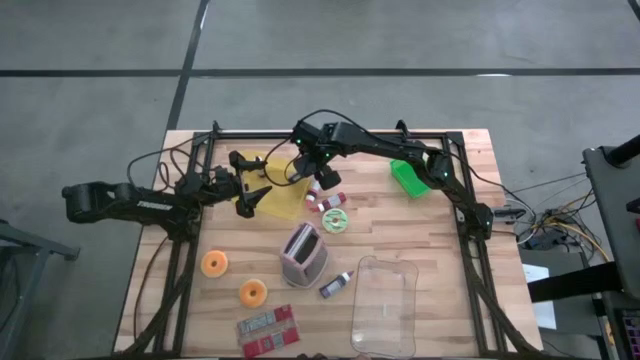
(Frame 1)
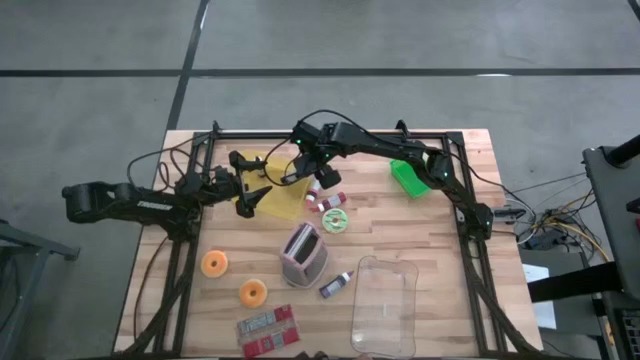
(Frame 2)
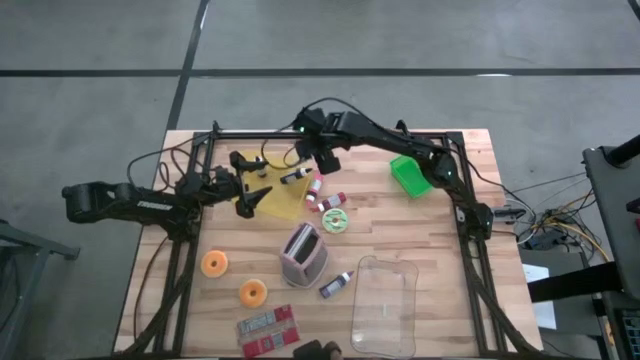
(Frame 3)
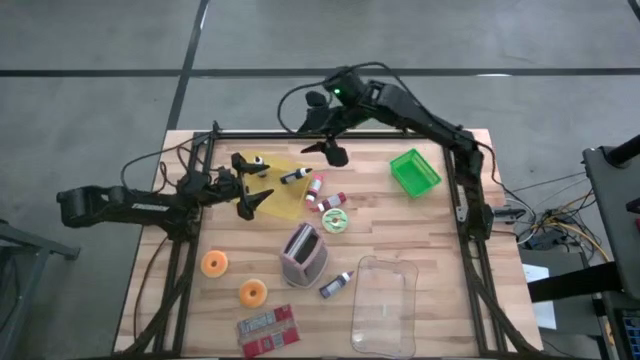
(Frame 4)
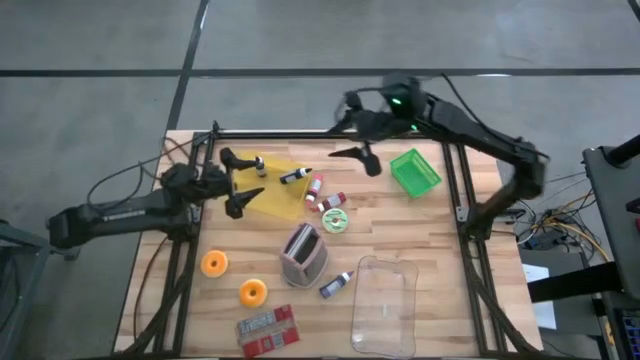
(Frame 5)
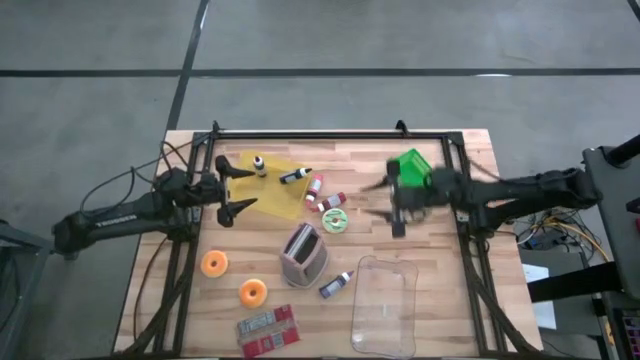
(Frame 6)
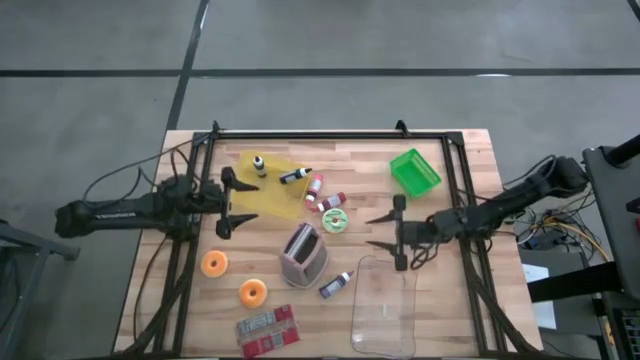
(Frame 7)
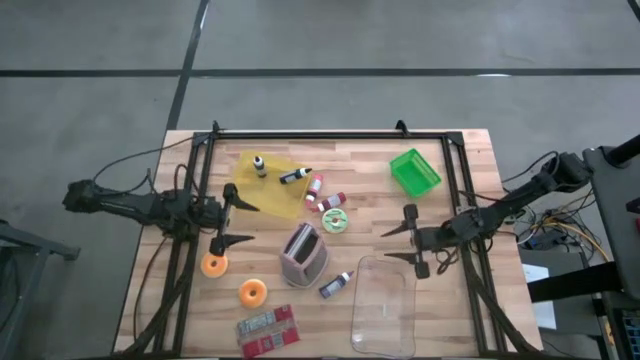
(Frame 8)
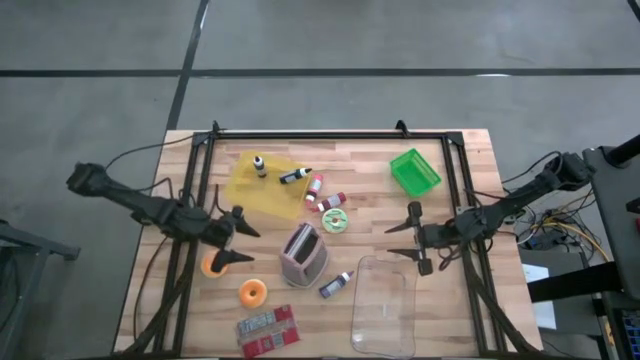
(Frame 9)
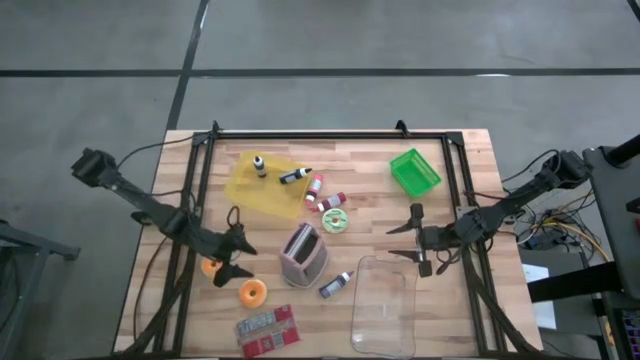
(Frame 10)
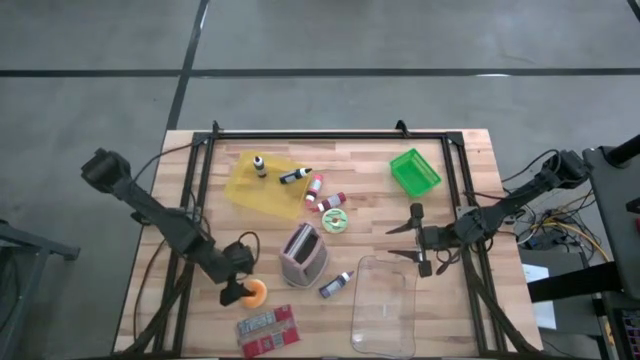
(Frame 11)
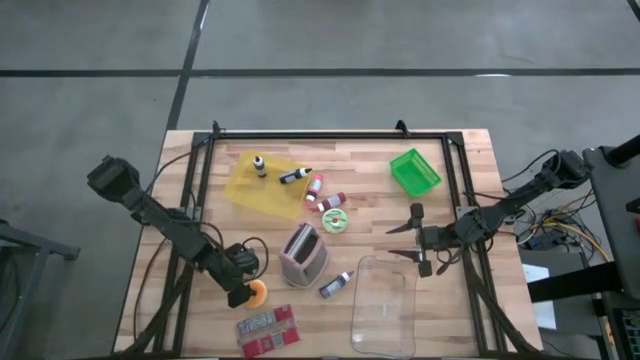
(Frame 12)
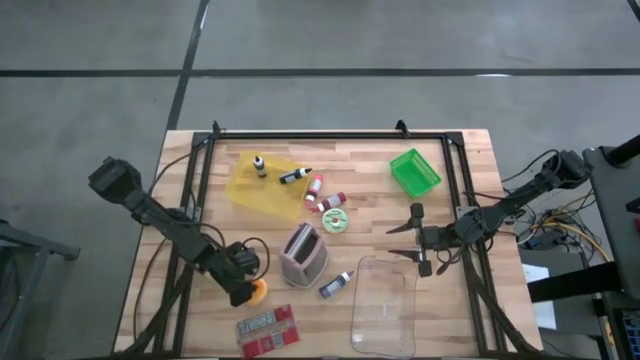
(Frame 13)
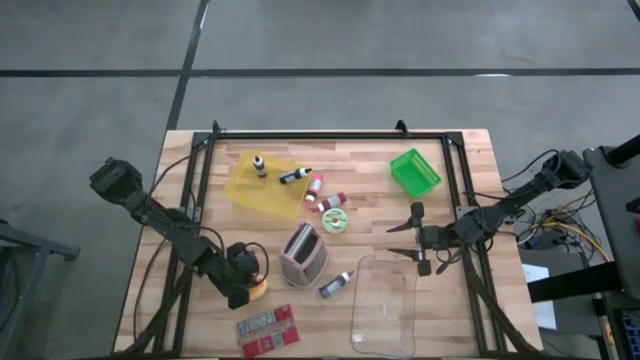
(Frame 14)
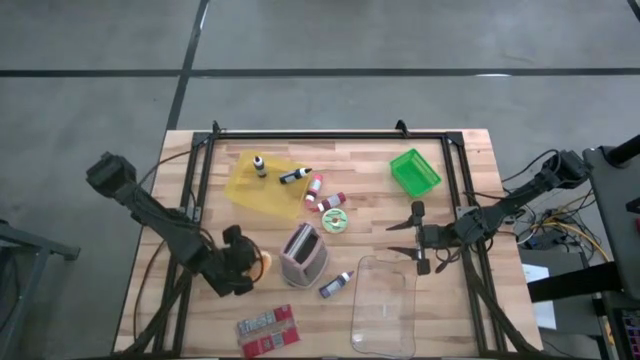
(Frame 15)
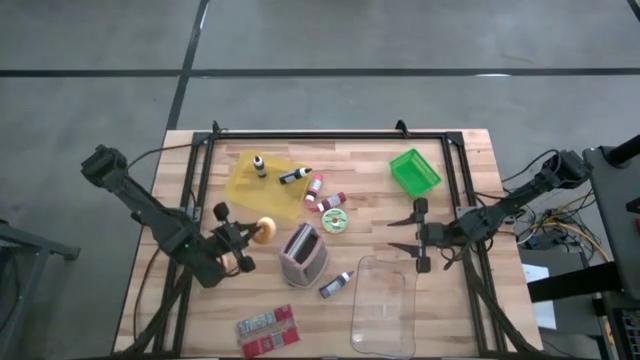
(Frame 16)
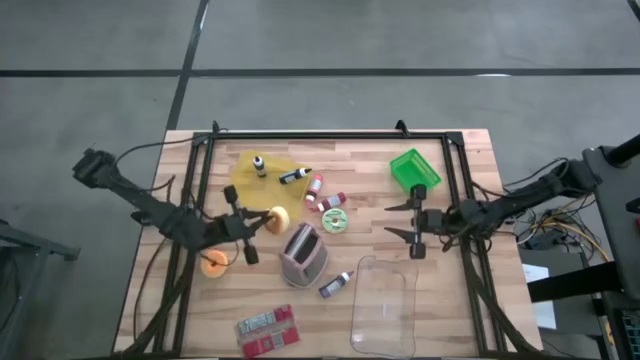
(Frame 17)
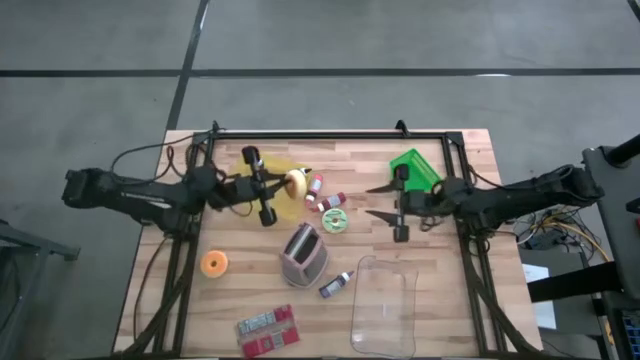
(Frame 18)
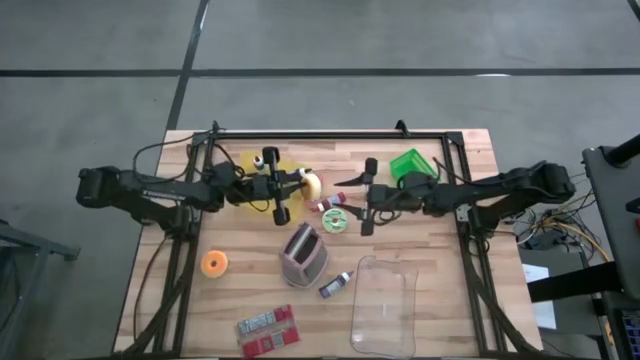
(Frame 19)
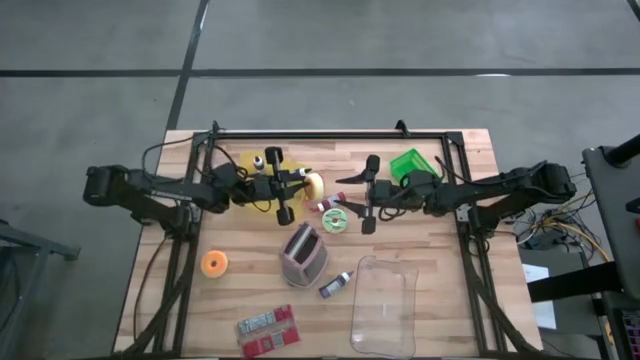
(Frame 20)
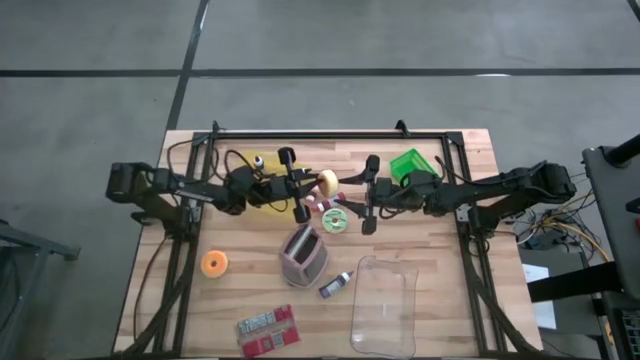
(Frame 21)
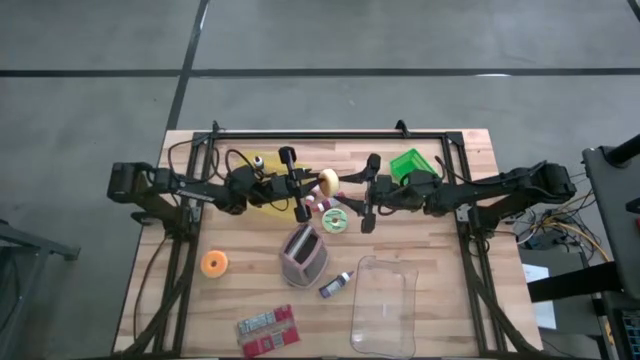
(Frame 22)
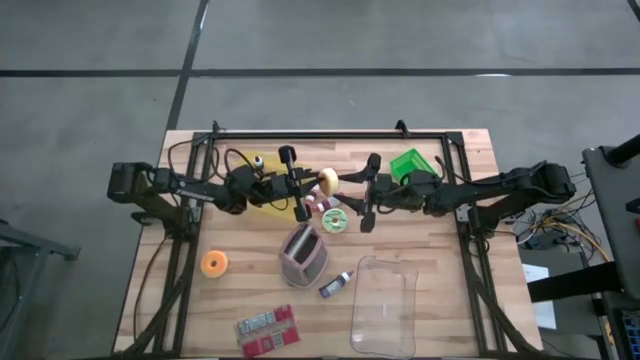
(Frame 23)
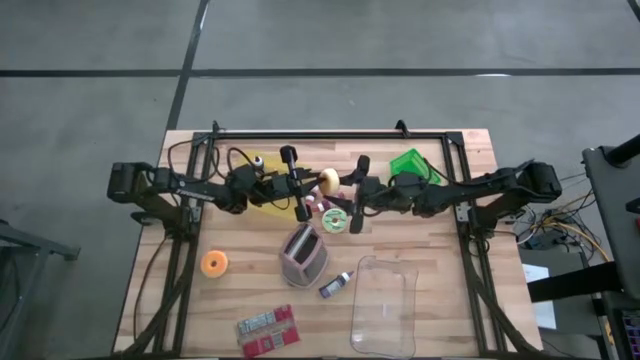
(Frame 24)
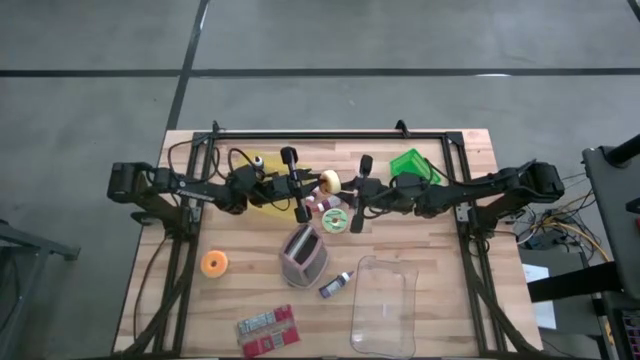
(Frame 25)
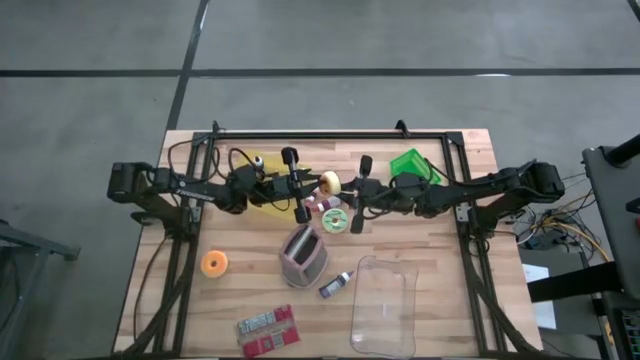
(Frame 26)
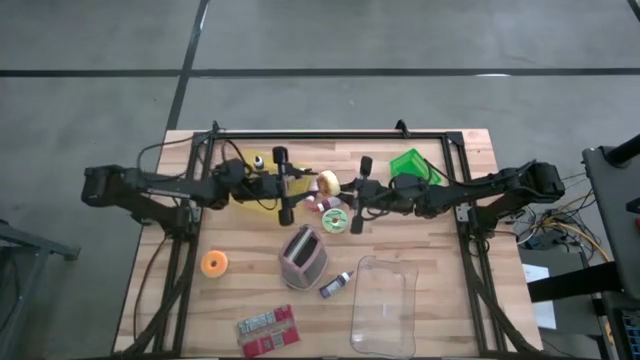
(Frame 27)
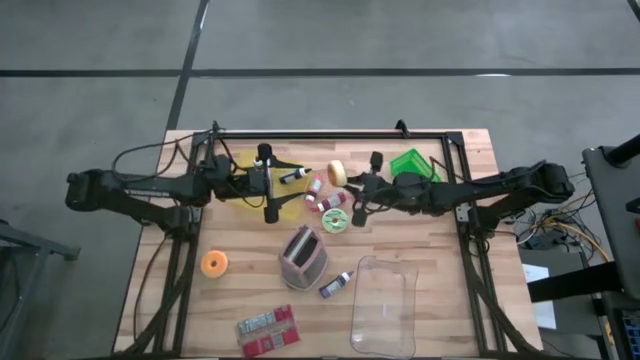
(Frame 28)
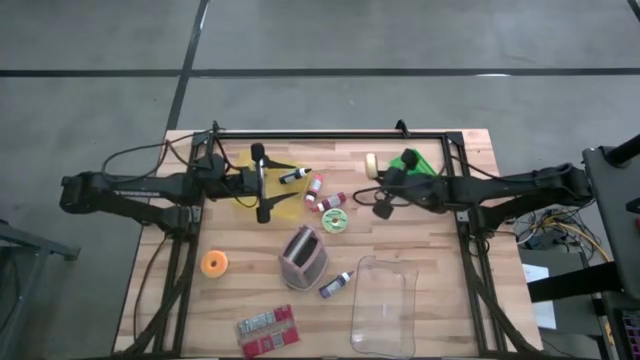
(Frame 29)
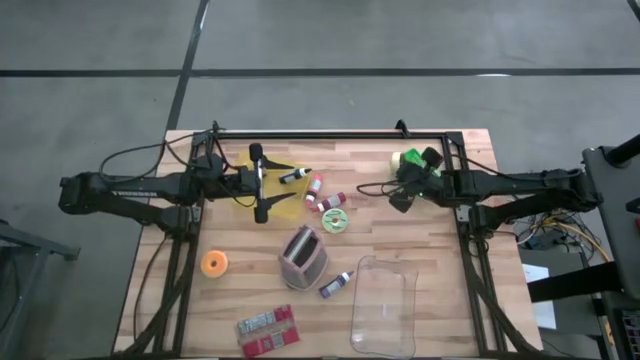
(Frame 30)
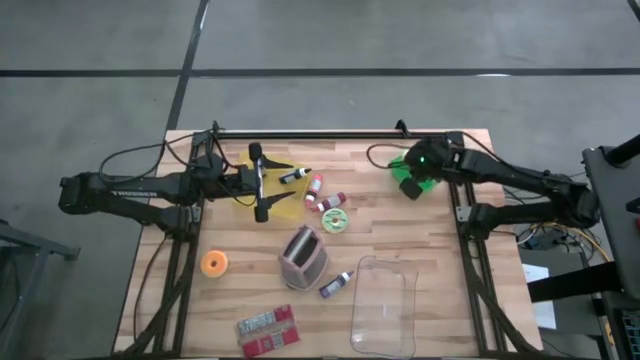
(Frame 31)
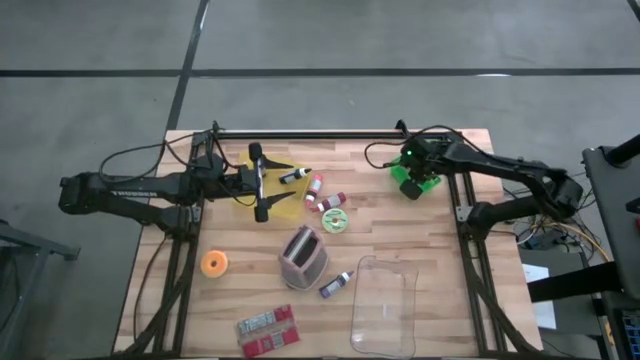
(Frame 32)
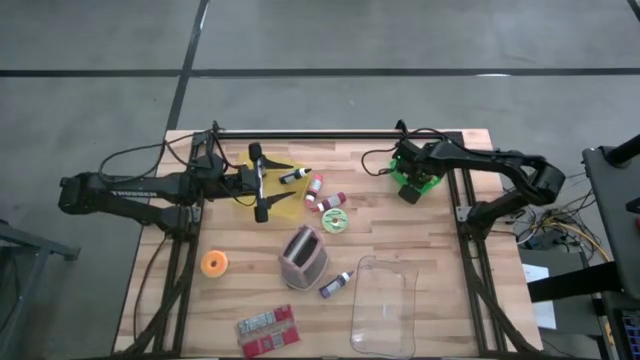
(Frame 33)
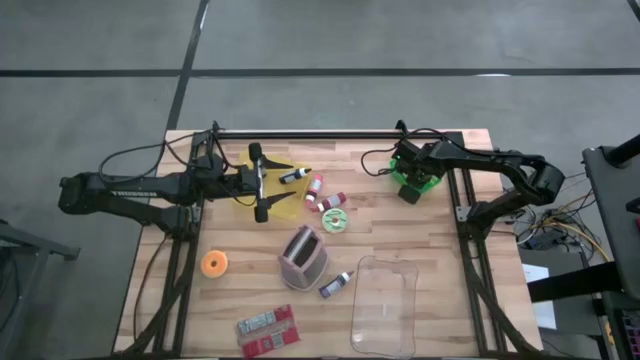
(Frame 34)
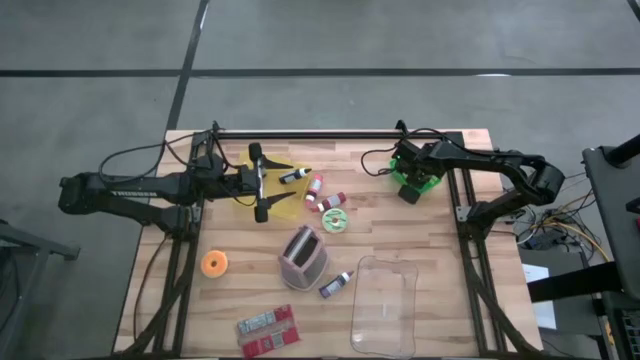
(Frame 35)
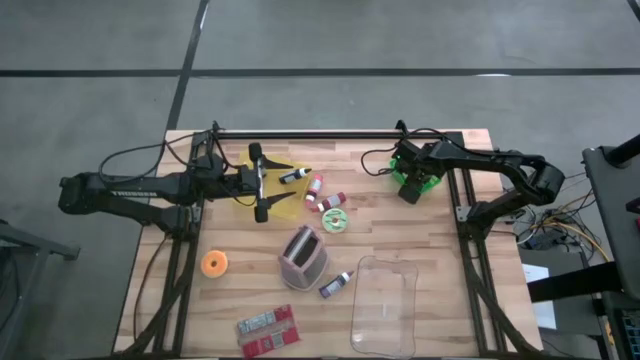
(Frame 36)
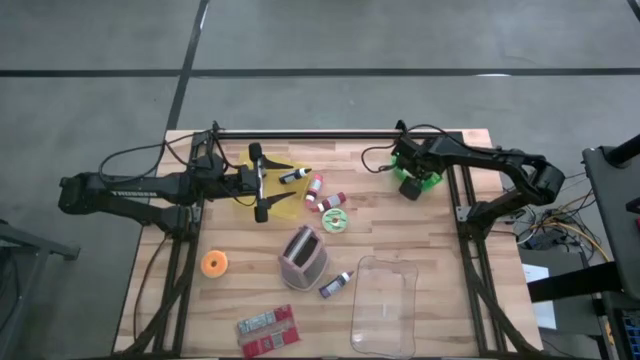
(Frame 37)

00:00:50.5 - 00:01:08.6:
Task: Pick & Place Food Item
Put the black donut into the green bin

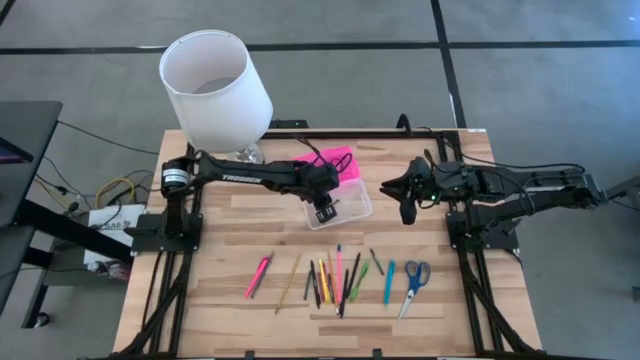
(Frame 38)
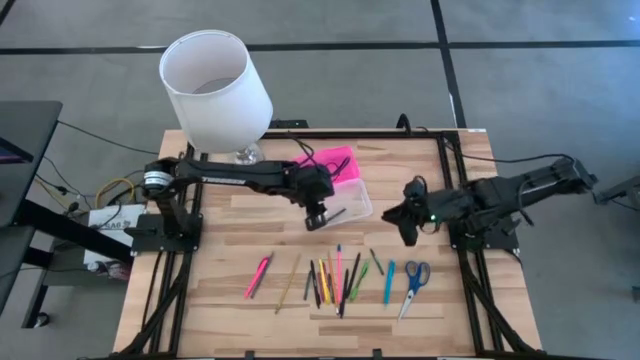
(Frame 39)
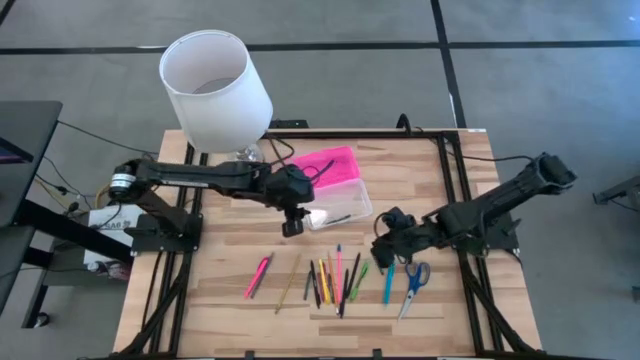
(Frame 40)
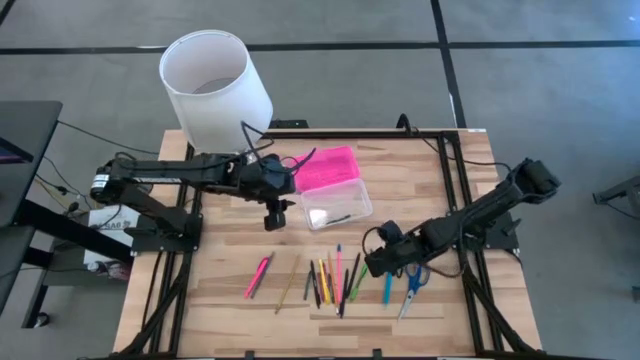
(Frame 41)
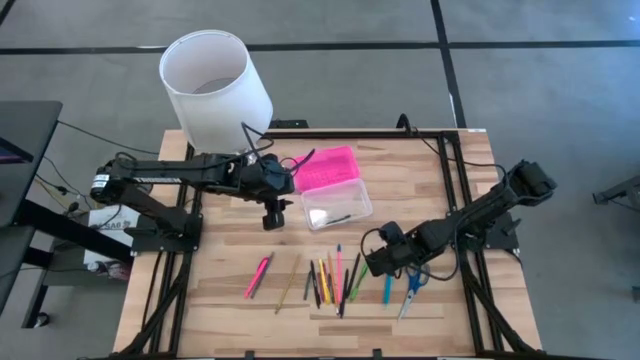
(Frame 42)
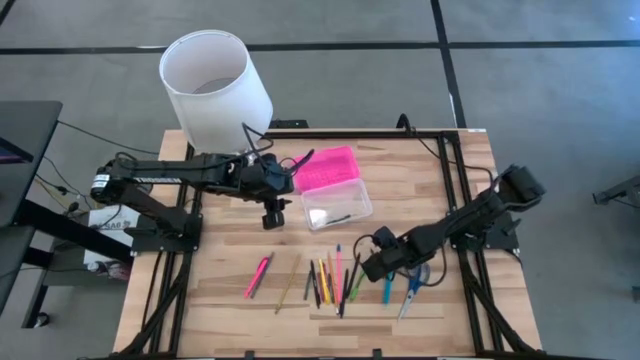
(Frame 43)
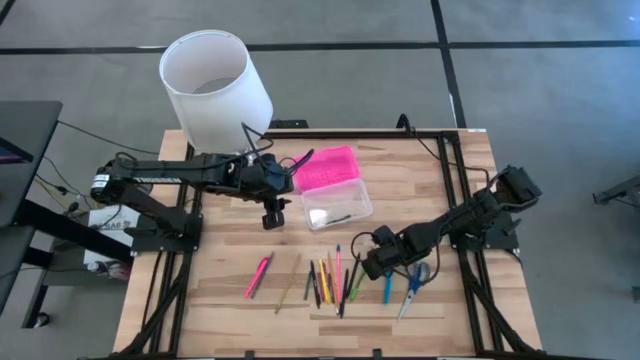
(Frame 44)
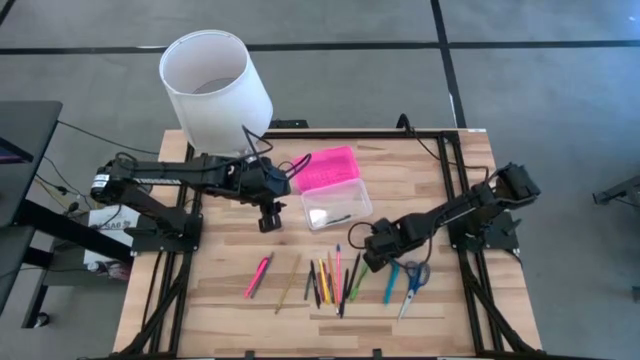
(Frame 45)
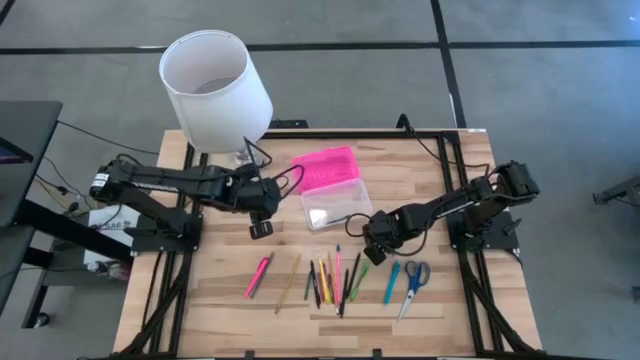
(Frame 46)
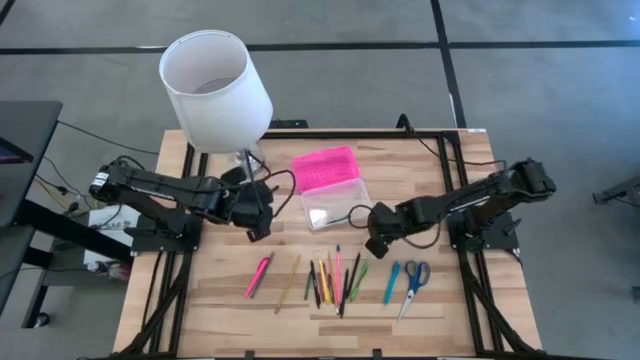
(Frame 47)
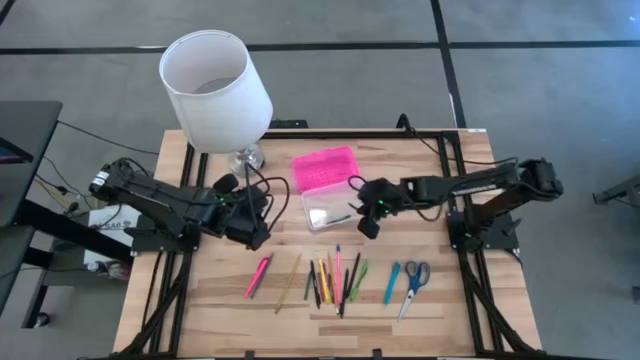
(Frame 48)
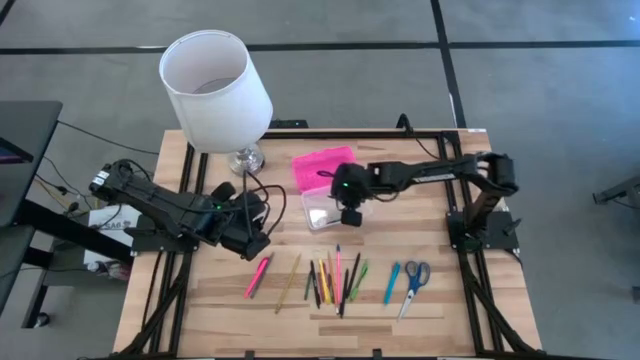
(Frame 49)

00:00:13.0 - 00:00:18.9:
Task: Pick & place school supplies into a supply box
Put the top right green crayon into the pink supply box
